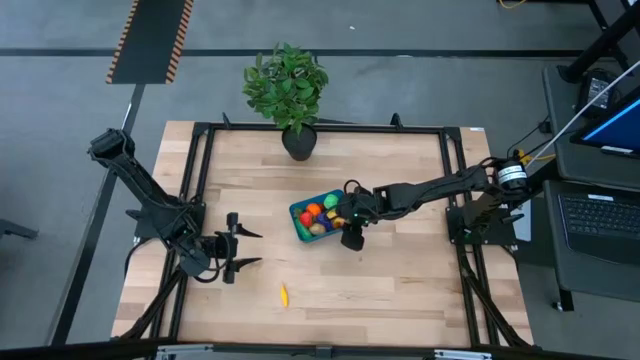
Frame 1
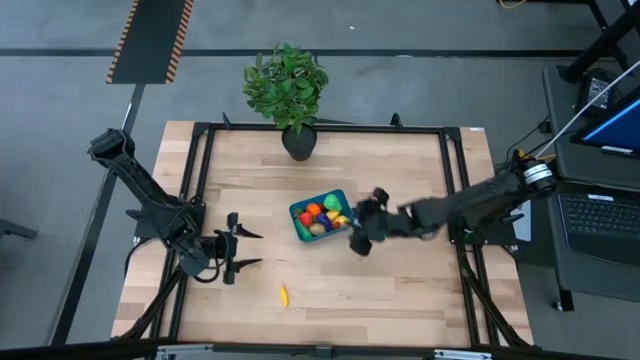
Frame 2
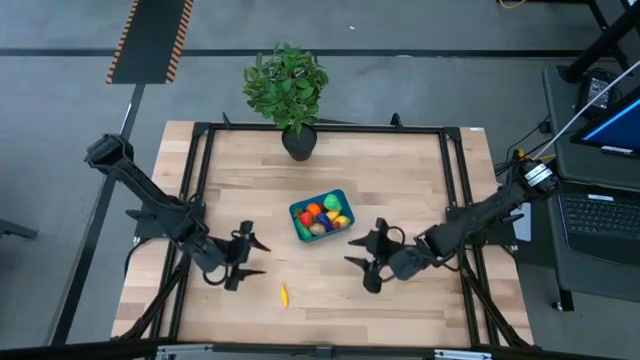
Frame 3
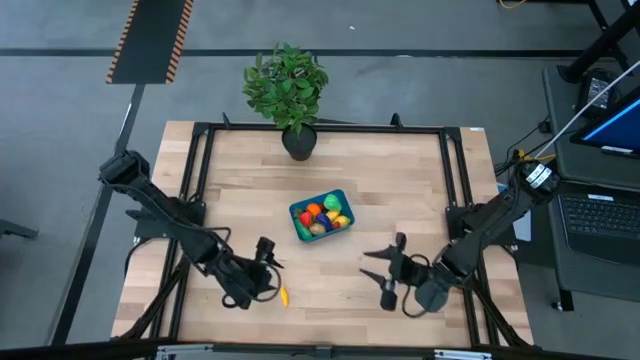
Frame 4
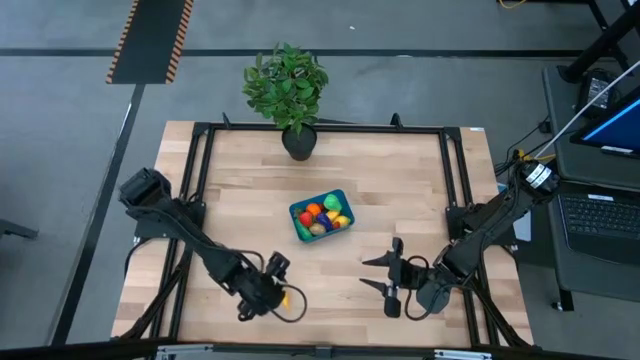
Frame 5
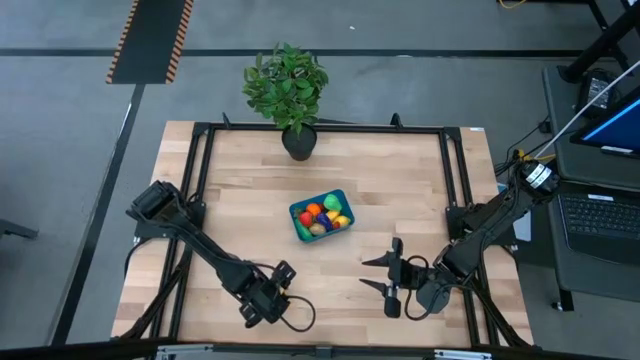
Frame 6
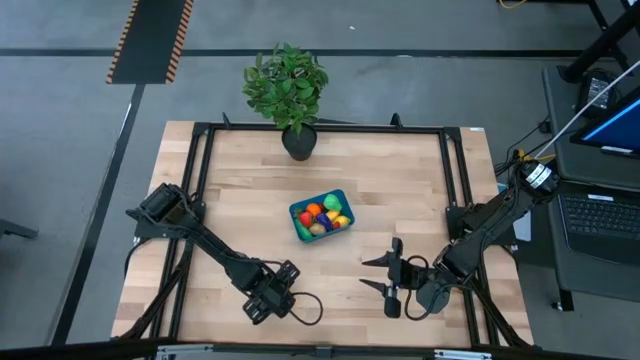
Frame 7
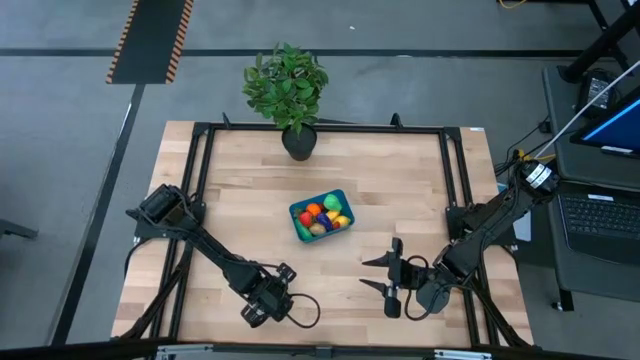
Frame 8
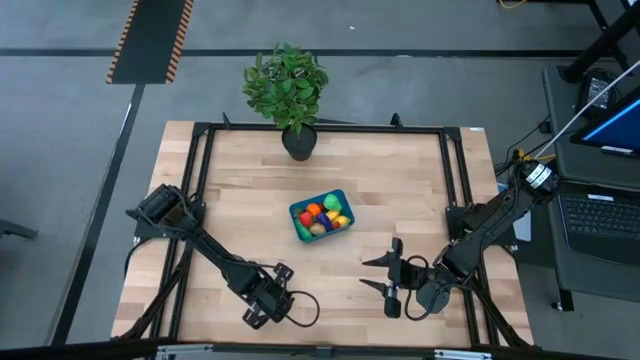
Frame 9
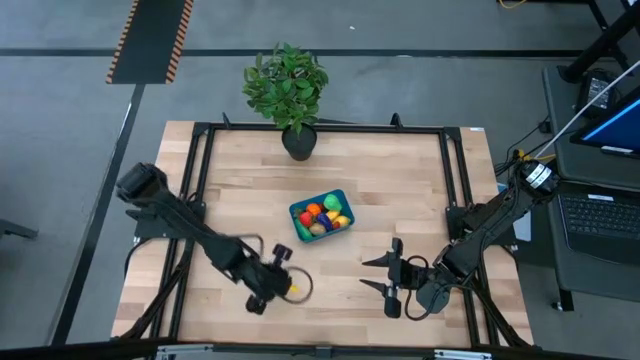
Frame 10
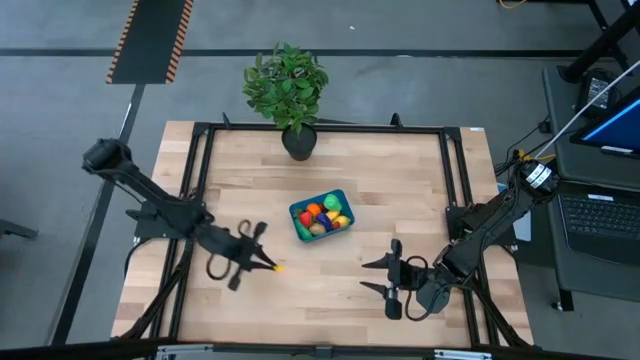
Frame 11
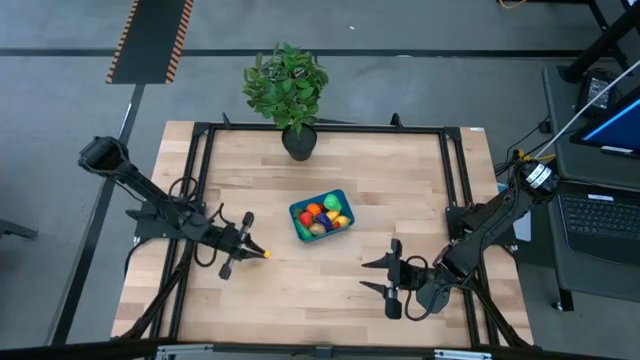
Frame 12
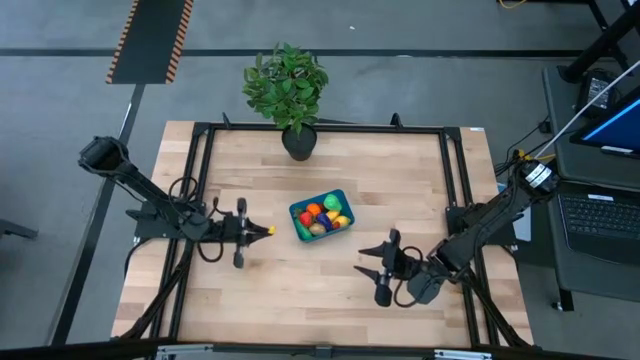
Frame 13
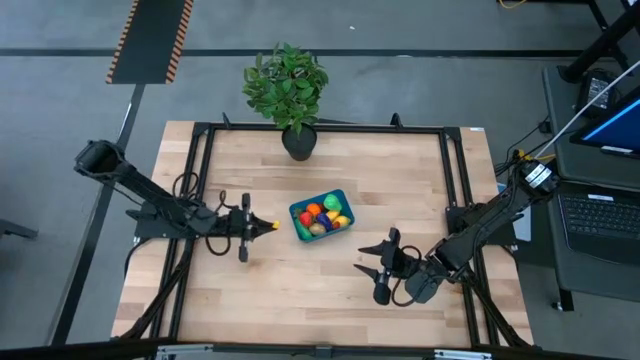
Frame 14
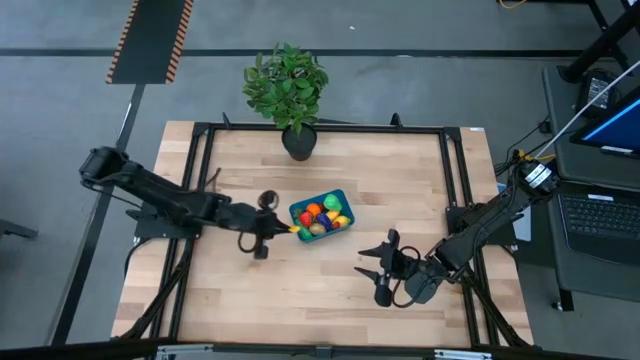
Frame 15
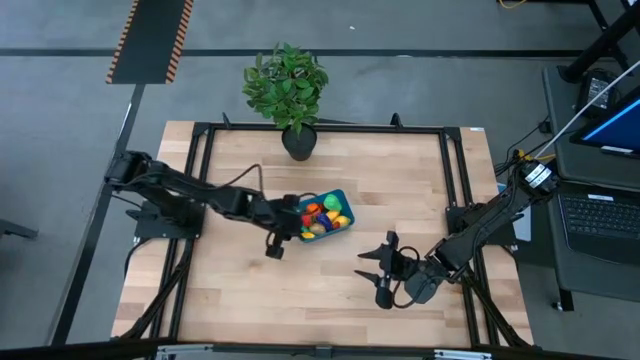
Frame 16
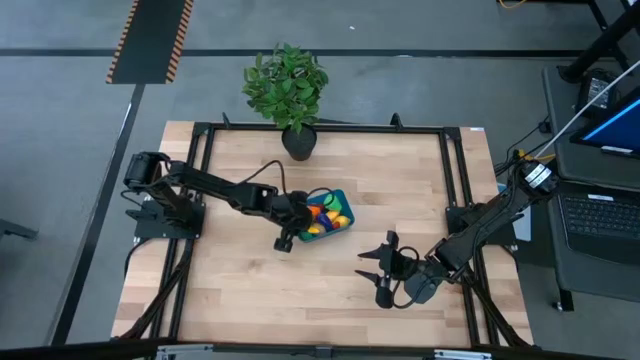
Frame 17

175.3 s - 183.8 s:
Task: Pick and placing Produce into tupperware
Put the yellow corn into the blue bin

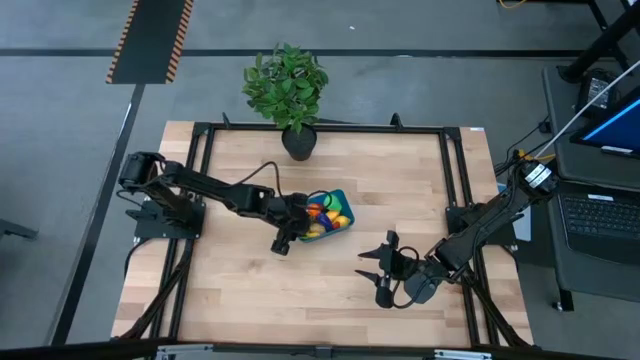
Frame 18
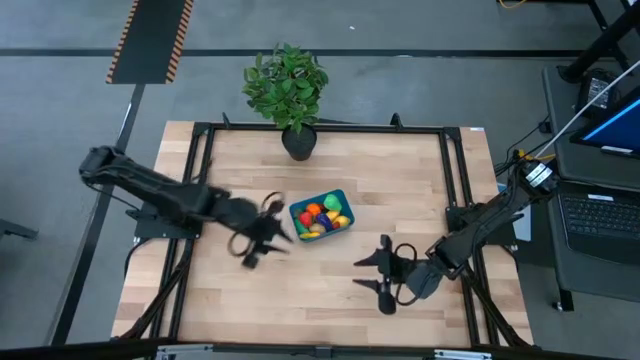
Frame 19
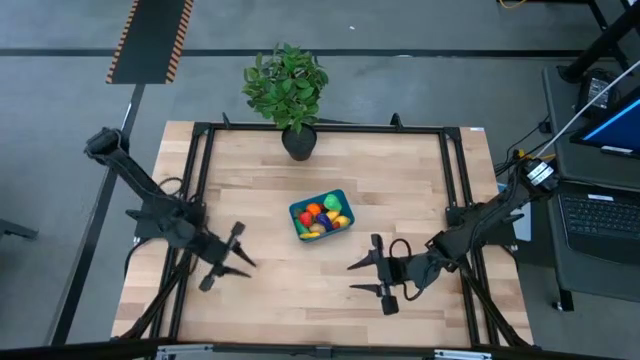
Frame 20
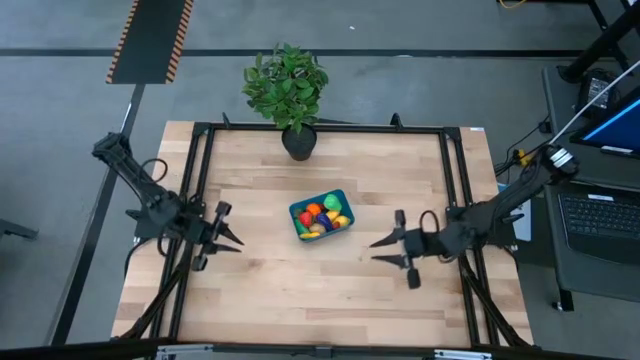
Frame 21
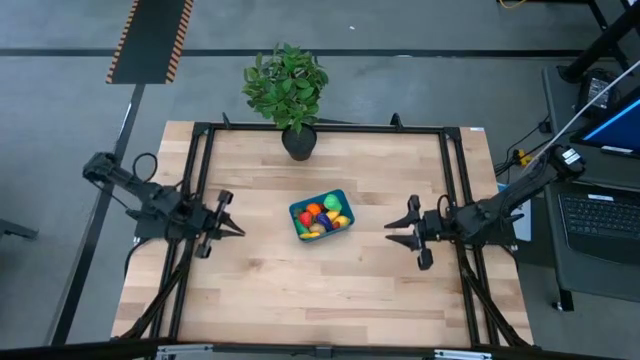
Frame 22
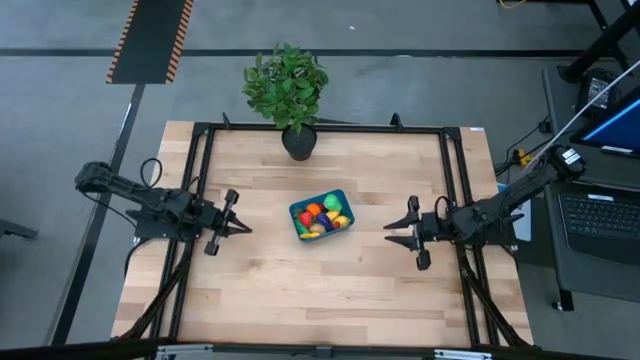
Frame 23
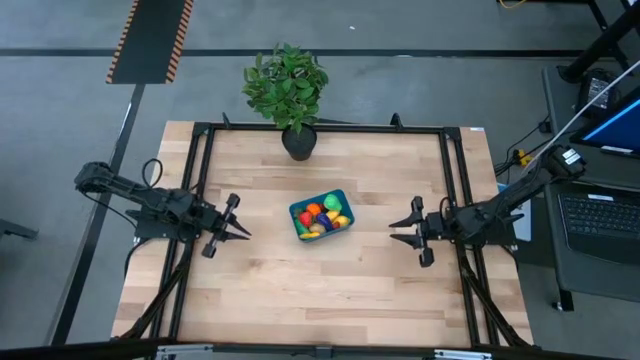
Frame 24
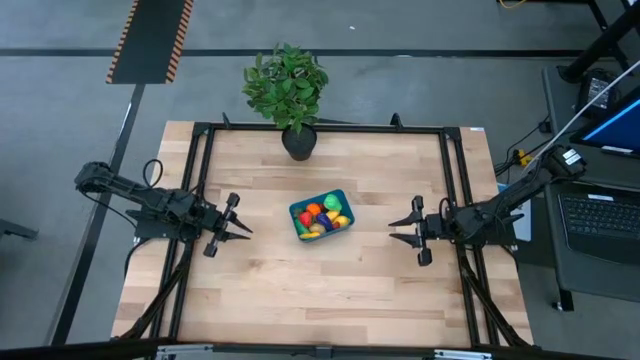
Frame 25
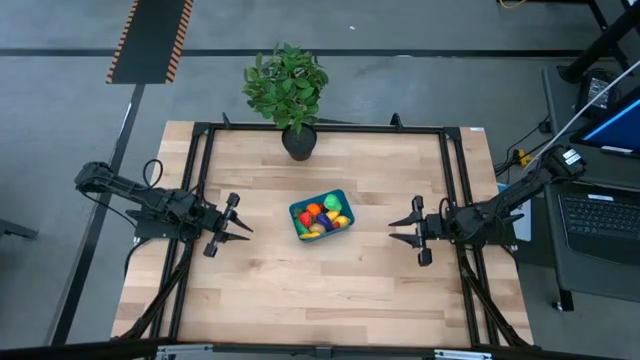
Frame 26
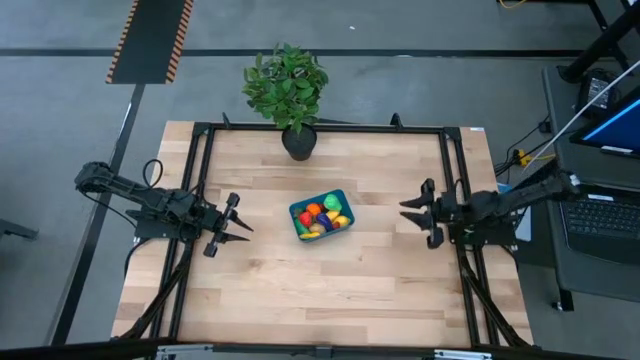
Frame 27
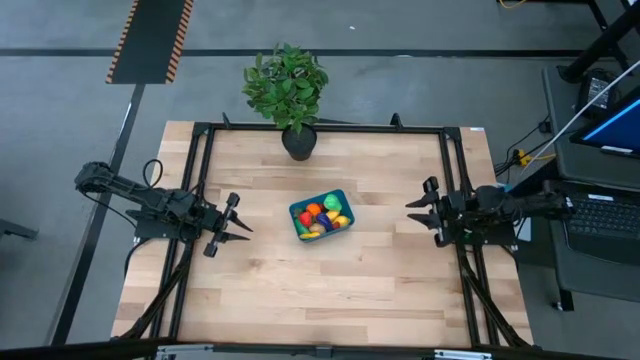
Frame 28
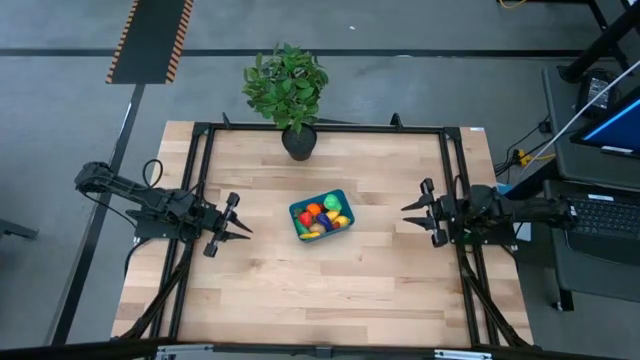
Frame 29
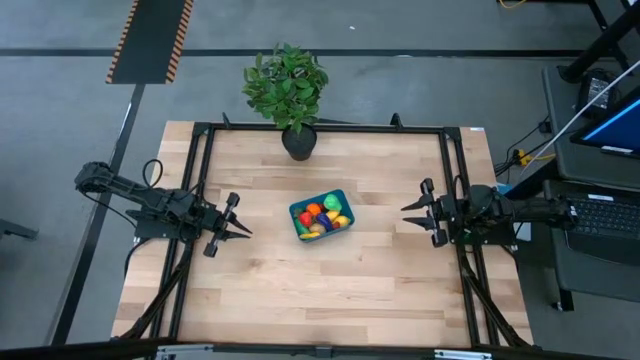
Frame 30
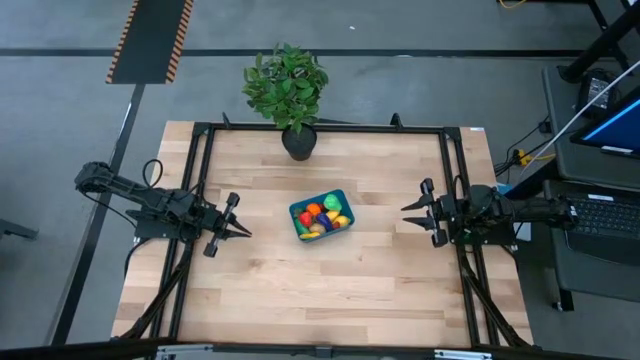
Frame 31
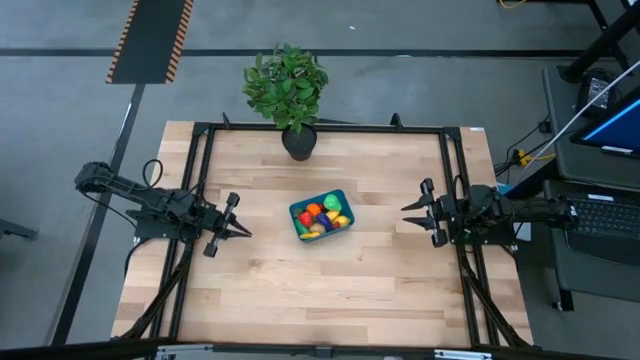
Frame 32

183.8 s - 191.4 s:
Return to Home Position

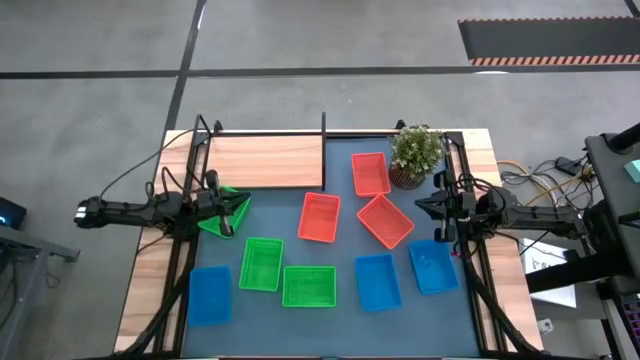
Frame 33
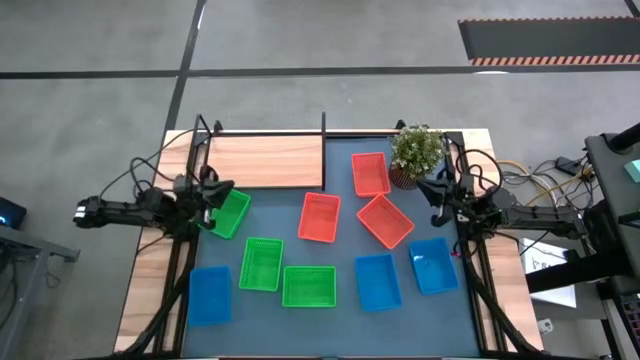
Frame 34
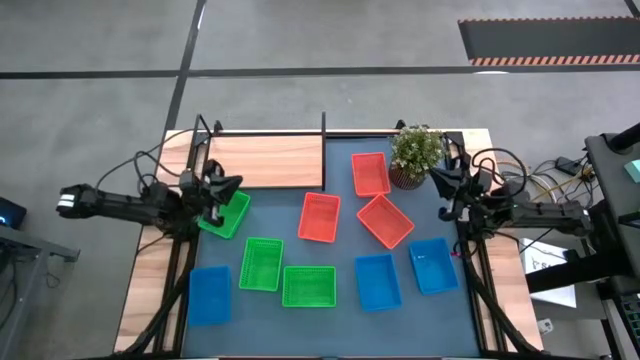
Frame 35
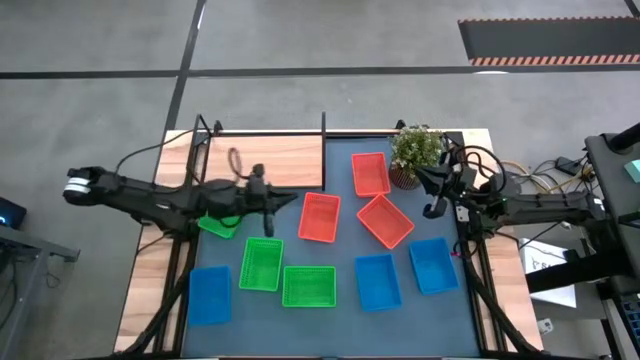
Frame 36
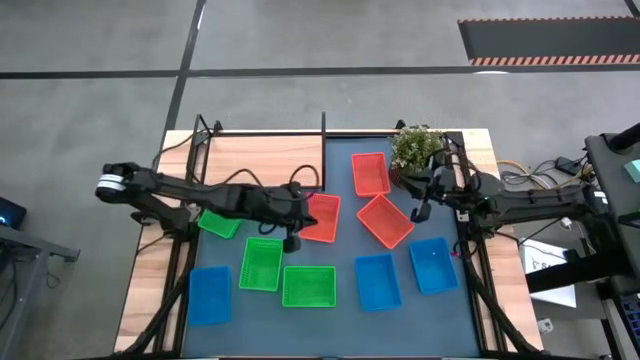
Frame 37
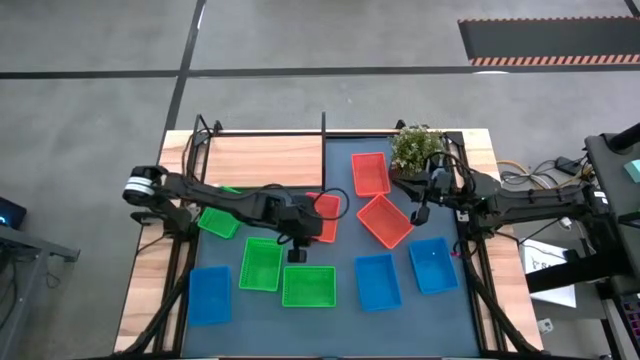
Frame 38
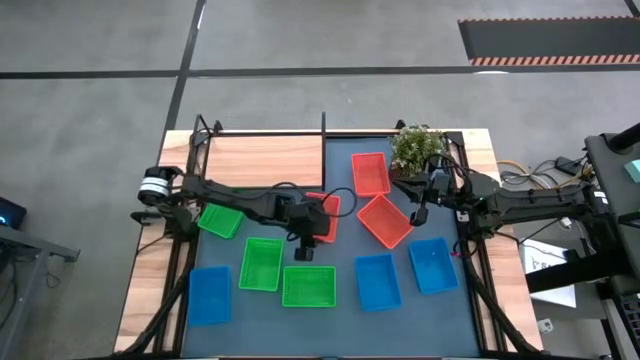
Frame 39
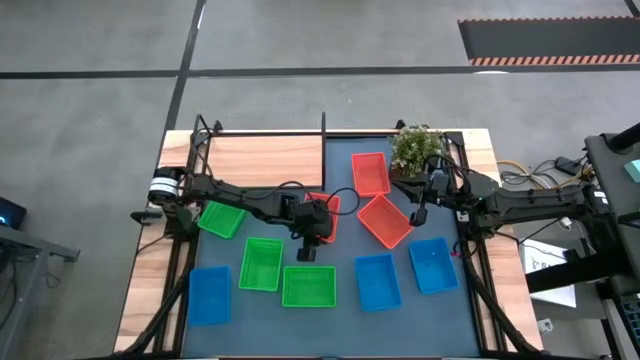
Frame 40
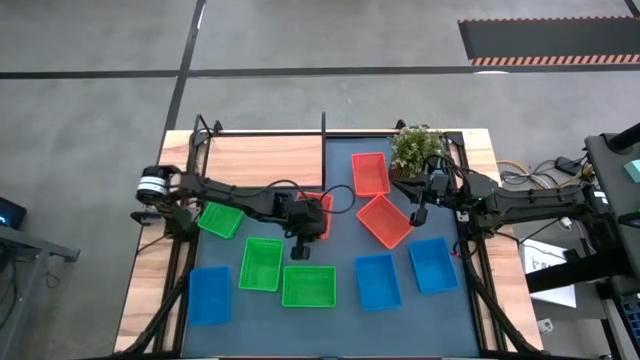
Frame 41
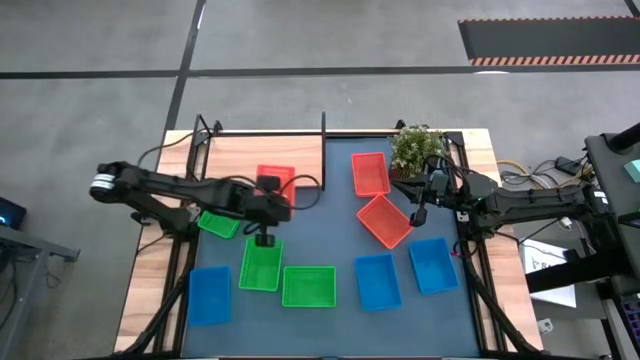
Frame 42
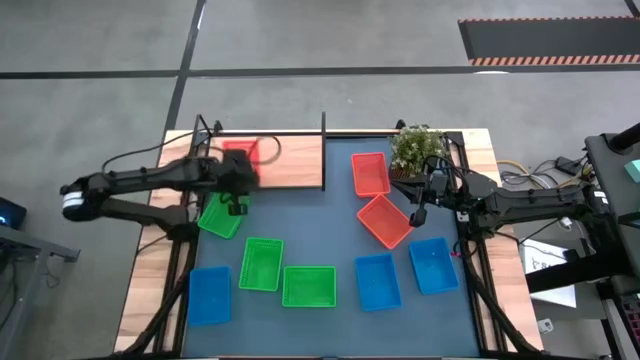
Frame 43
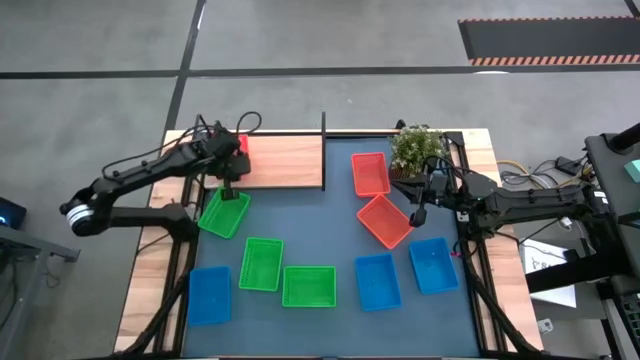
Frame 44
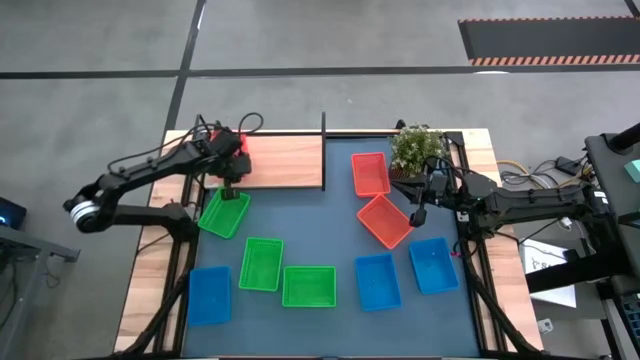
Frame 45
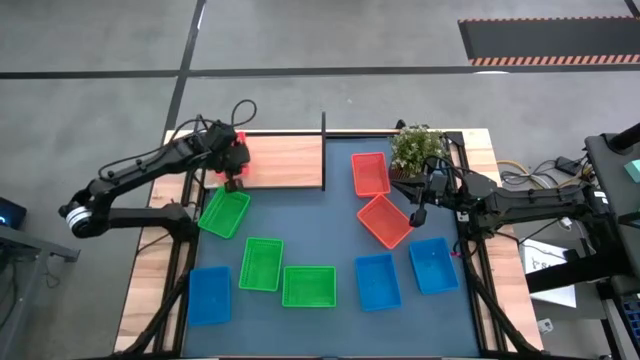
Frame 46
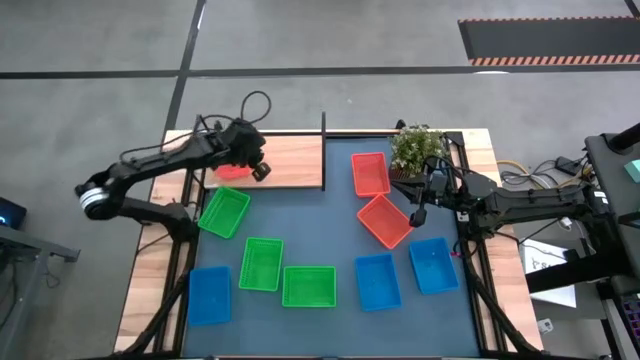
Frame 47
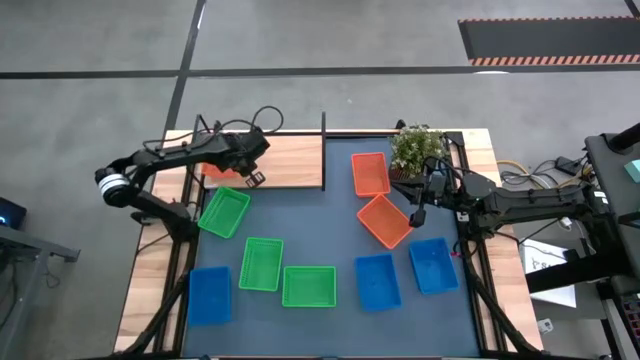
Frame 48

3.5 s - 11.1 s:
Task: Stack baskets on shelf by color
Put the bottom left orange bin on the shelf
